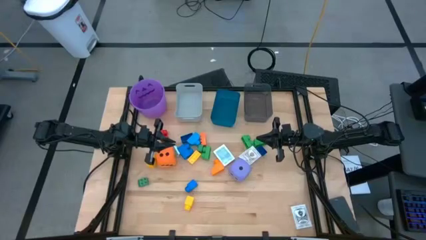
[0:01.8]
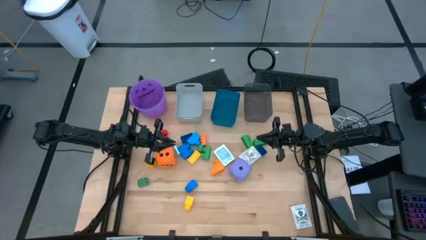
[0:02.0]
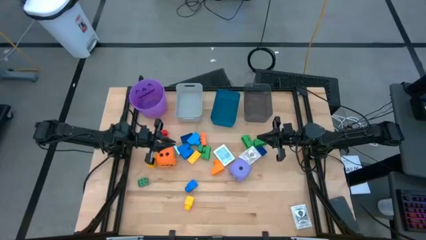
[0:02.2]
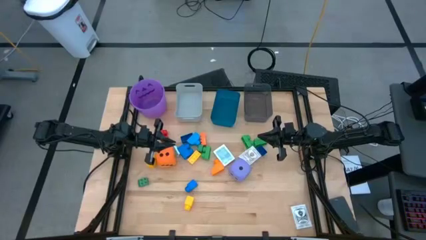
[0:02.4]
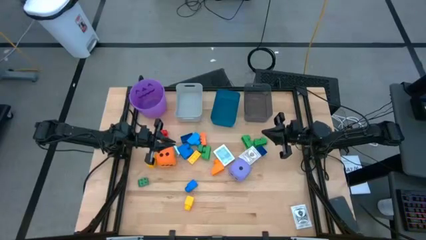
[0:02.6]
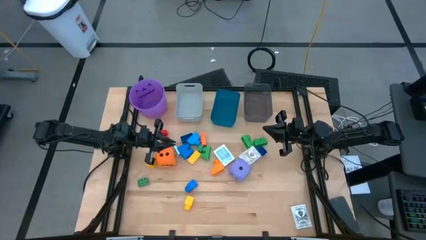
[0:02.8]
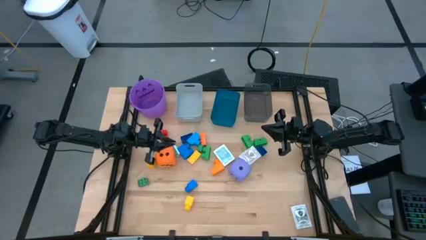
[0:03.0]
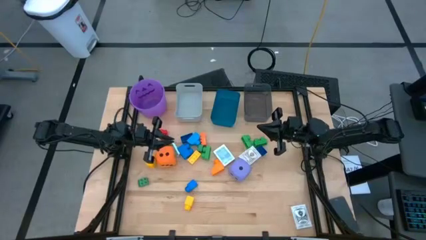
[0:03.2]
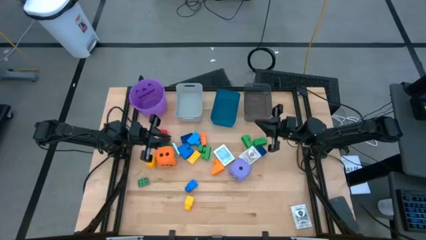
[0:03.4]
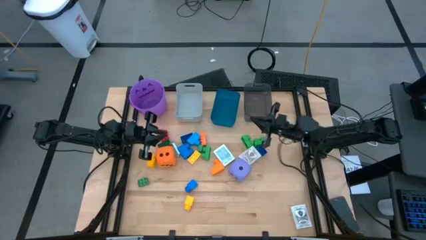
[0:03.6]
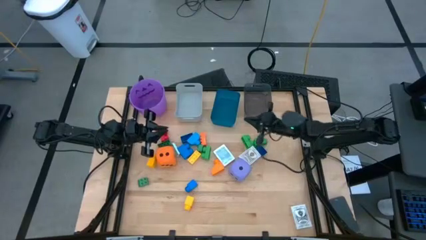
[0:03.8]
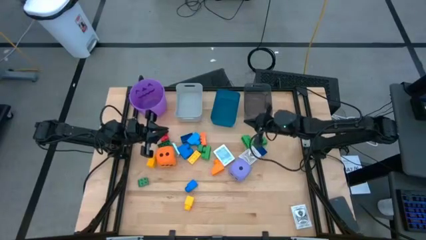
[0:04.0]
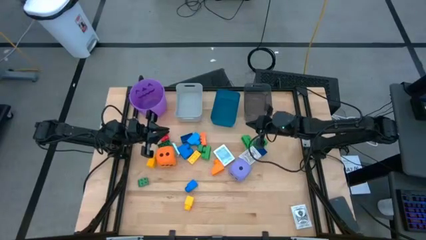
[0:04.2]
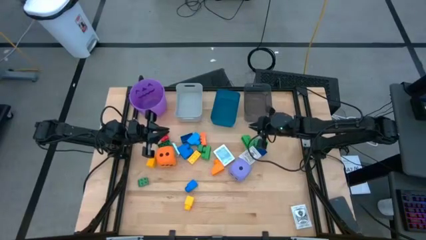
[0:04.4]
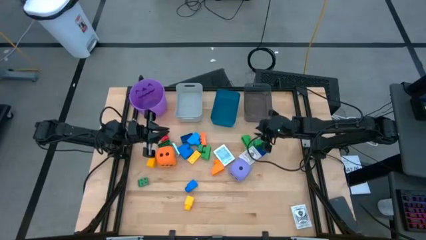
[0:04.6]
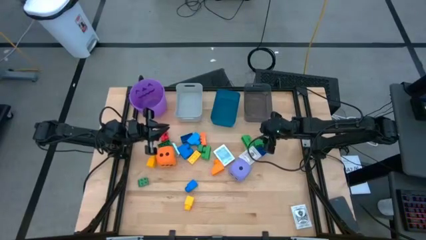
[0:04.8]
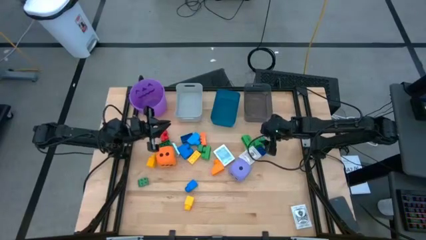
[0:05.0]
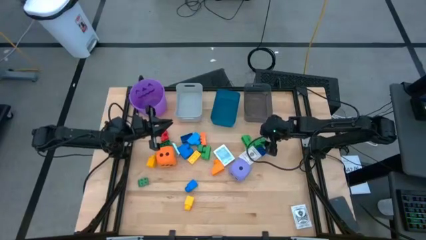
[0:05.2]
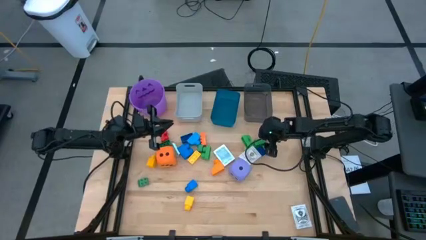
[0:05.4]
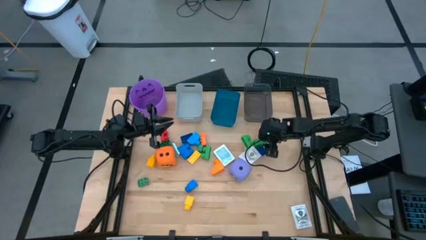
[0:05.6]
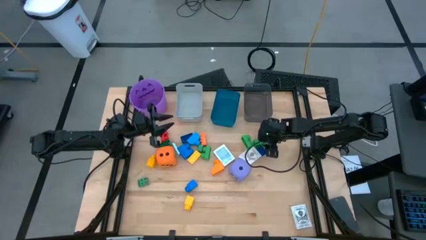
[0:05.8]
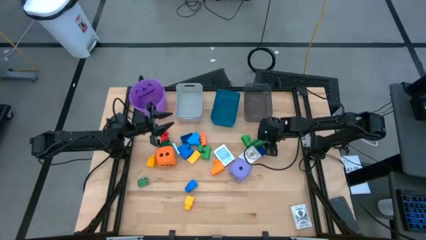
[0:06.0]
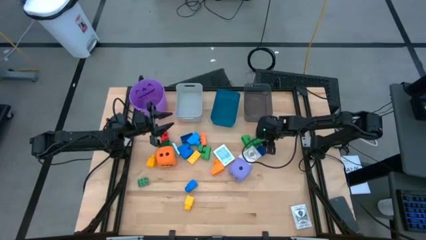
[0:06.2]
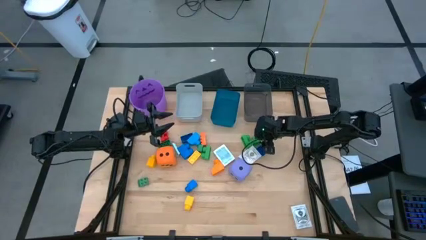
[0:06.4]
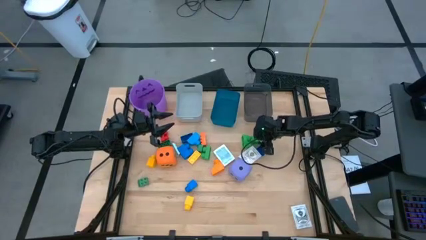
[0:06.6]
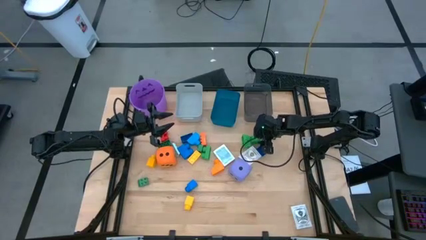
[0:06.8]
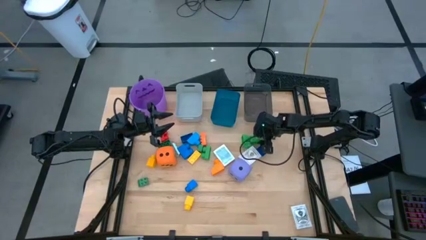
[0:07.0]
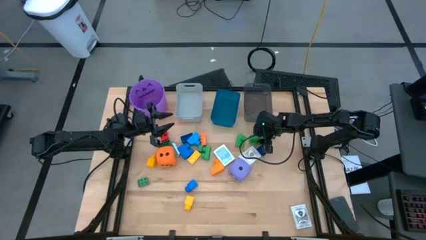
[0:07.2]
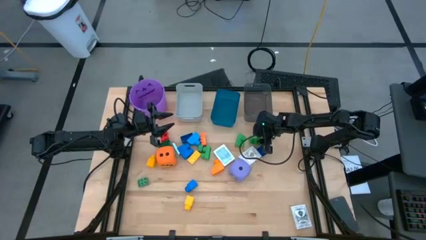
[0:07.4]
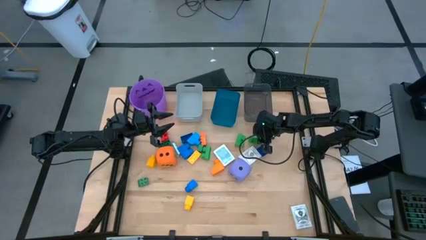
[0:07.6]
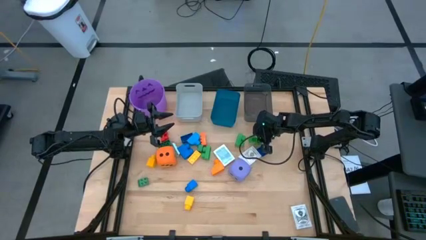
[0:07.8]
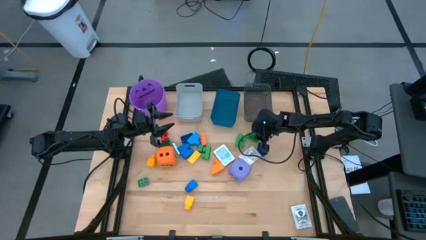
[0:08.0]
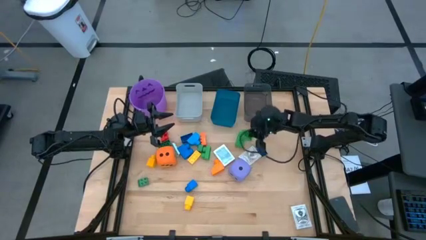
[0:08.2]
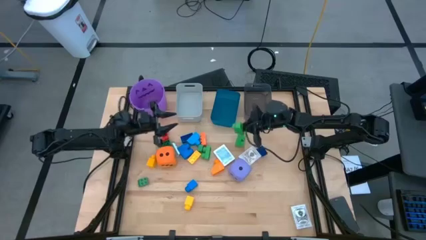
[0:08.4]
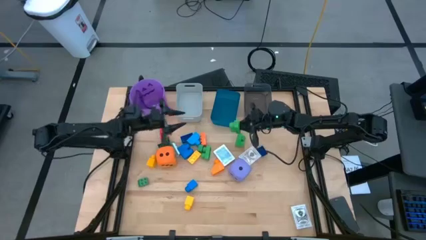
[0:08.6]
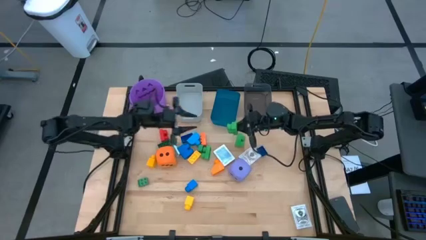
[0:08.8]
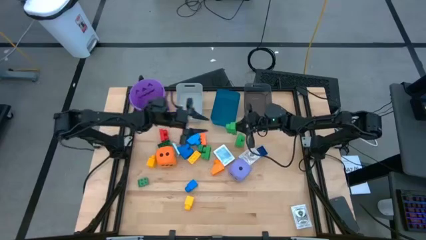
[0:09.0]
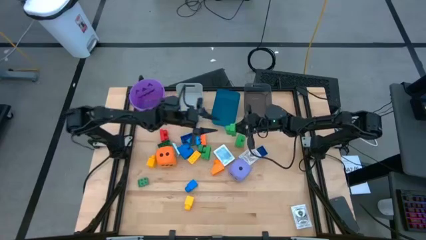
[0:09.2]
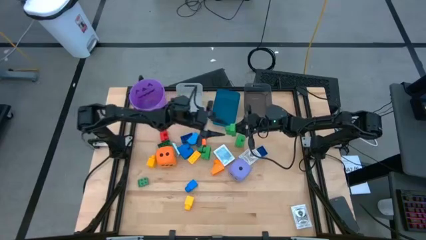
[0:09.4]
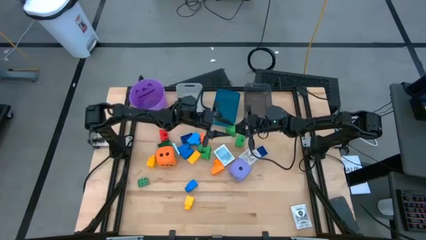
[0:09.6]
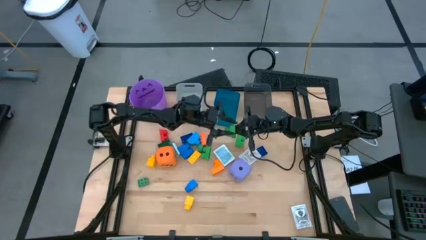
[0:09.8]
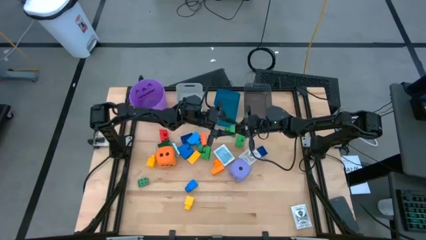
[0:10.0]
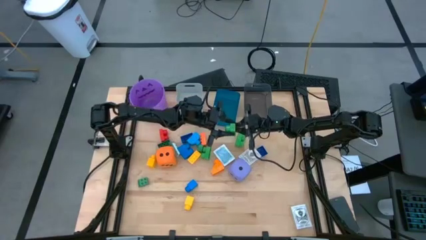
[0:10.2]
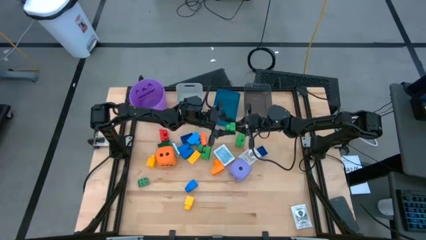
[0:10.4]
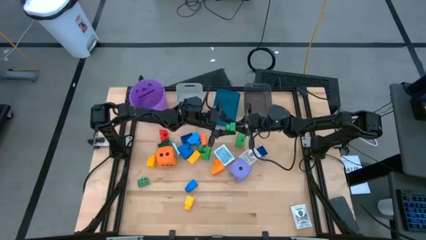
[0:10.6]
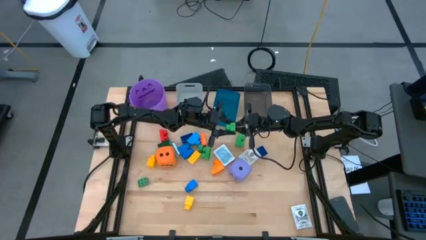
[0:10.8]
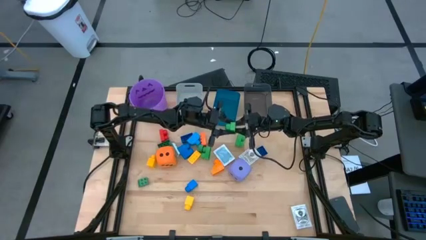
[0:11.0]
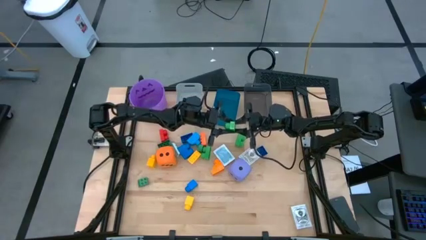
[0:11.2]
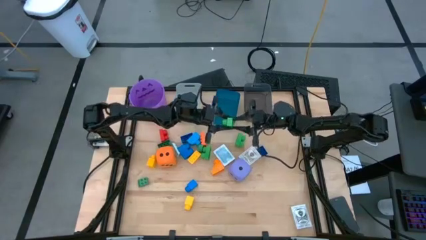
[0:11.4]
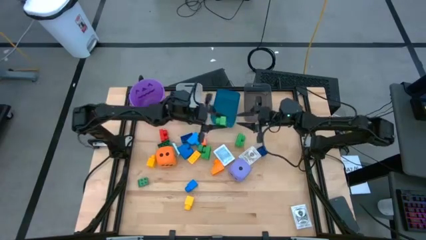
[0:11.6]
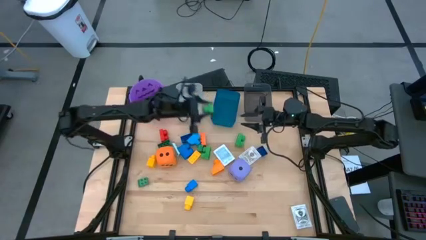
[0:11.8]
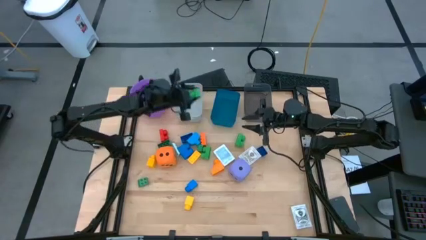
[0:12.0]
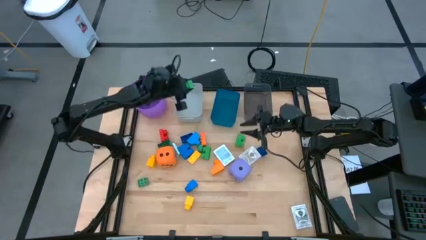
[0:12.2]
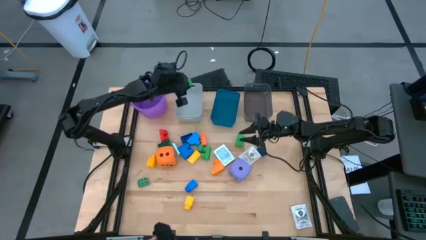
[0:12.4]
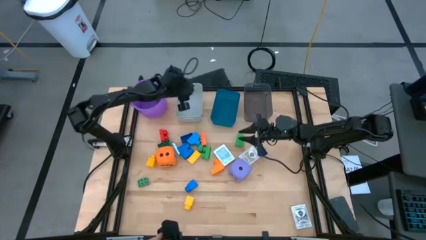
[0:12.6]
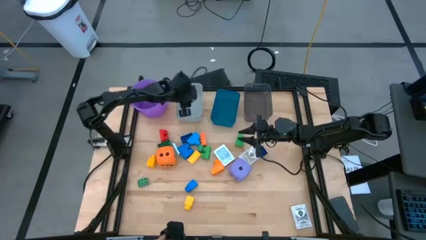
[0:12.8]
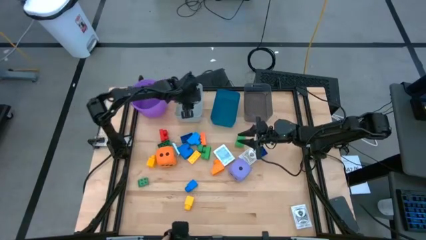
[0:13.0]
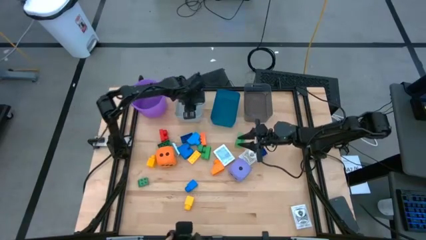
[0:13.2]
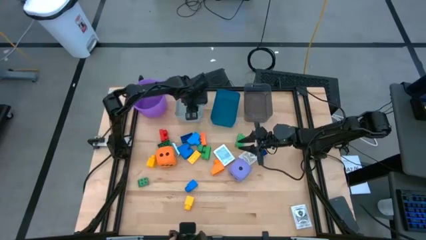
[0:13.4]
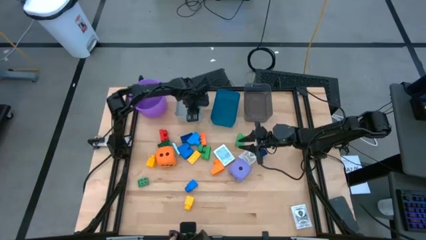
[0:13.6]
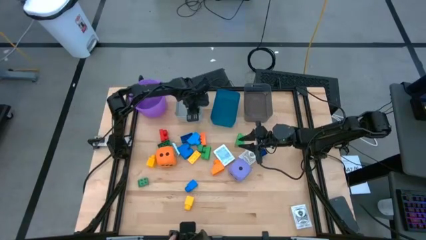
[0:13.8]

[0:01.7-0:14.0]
Task: Pick & Place Toys
Put the green game piece into the gray bin
